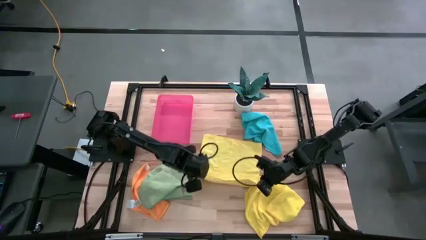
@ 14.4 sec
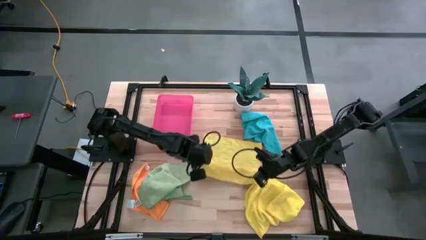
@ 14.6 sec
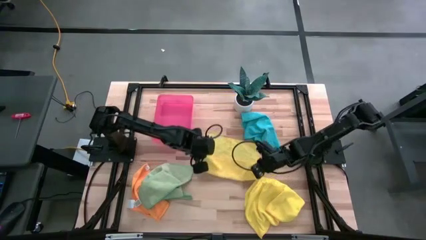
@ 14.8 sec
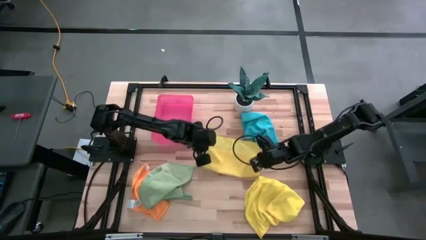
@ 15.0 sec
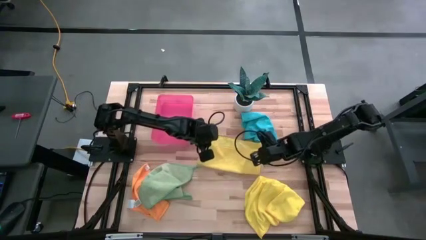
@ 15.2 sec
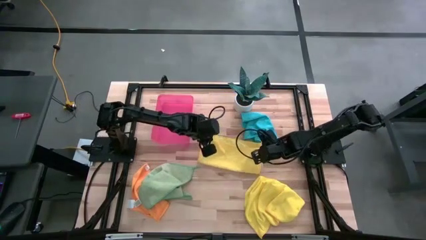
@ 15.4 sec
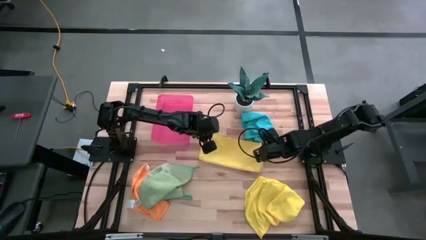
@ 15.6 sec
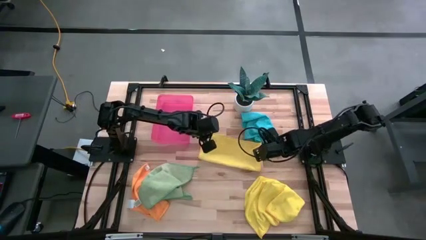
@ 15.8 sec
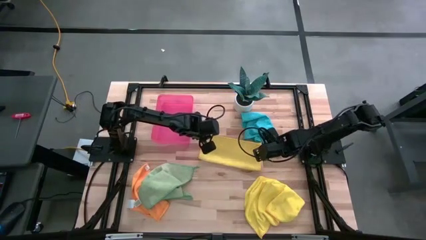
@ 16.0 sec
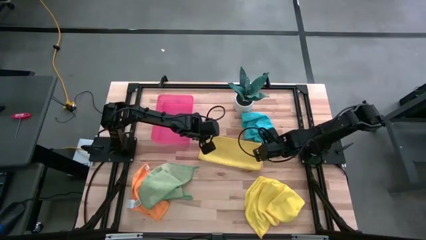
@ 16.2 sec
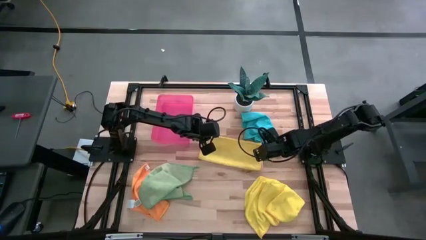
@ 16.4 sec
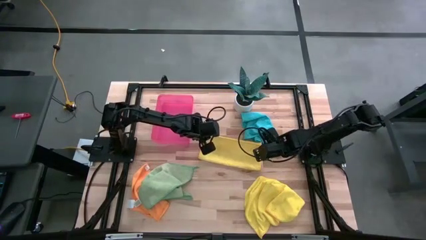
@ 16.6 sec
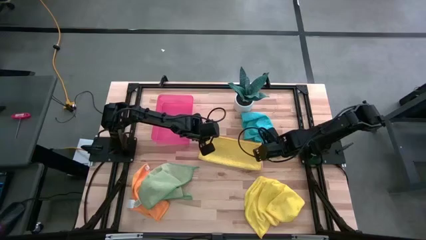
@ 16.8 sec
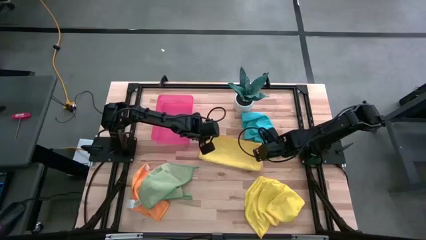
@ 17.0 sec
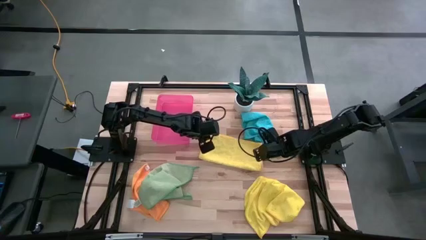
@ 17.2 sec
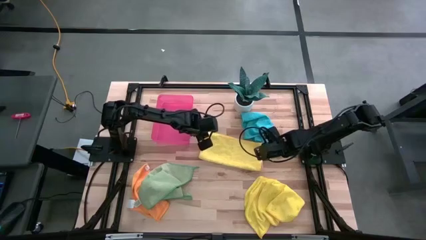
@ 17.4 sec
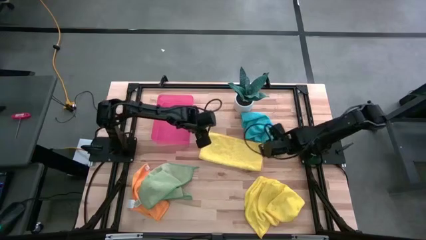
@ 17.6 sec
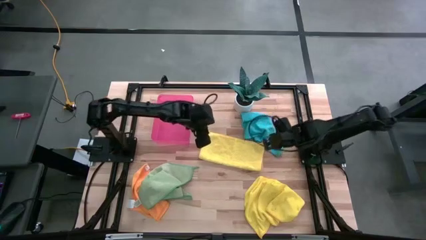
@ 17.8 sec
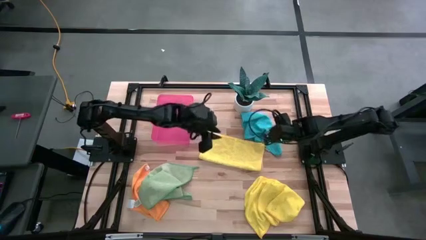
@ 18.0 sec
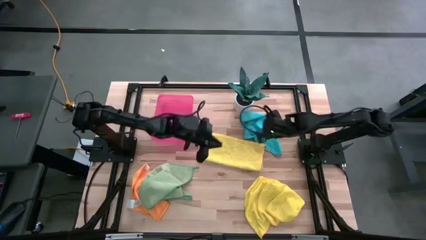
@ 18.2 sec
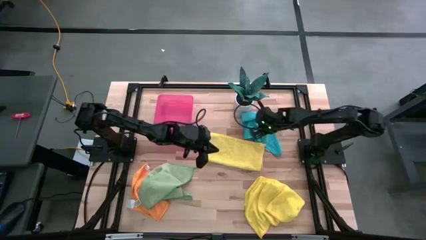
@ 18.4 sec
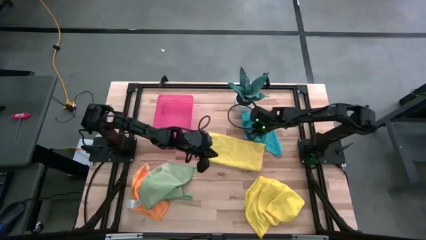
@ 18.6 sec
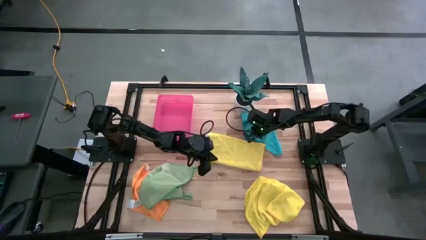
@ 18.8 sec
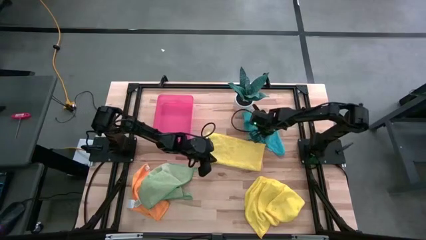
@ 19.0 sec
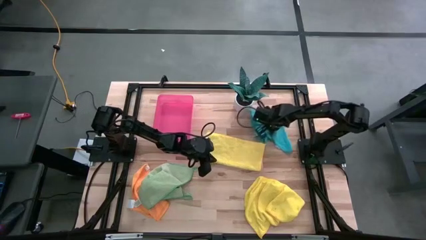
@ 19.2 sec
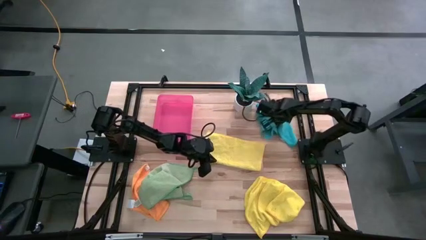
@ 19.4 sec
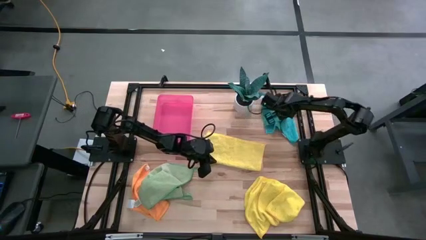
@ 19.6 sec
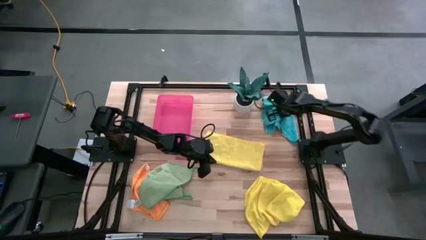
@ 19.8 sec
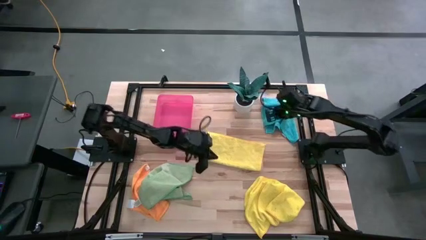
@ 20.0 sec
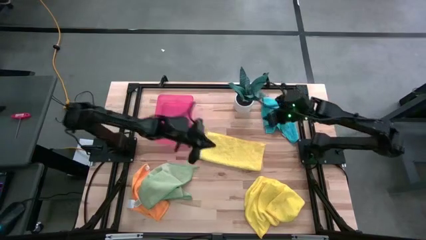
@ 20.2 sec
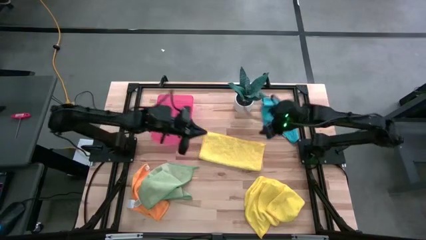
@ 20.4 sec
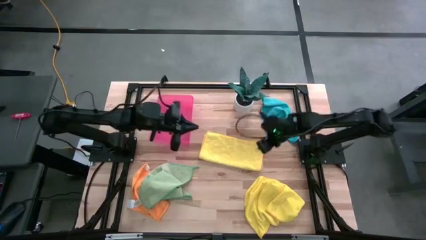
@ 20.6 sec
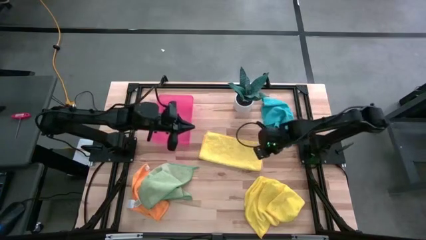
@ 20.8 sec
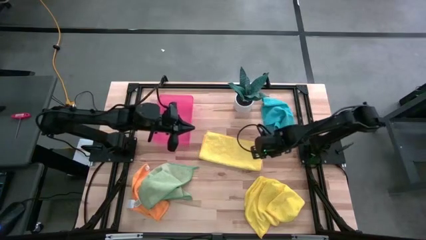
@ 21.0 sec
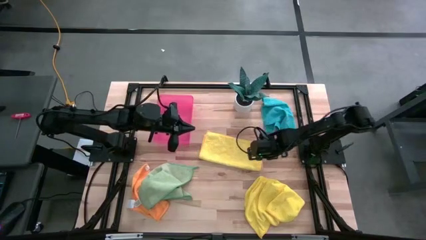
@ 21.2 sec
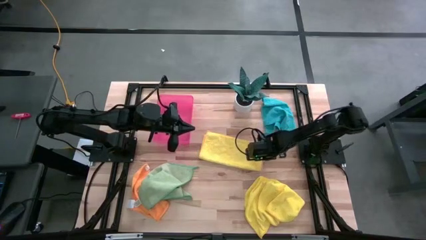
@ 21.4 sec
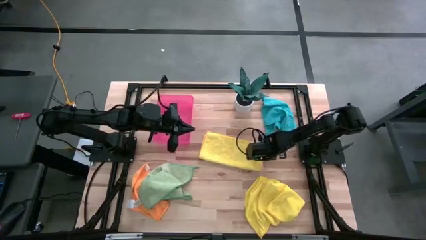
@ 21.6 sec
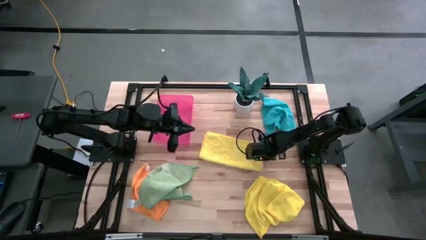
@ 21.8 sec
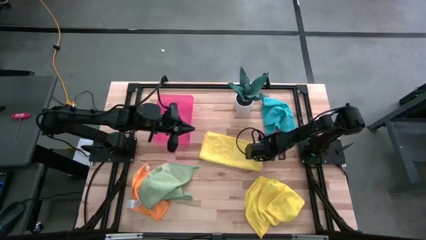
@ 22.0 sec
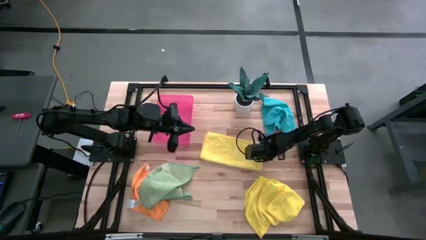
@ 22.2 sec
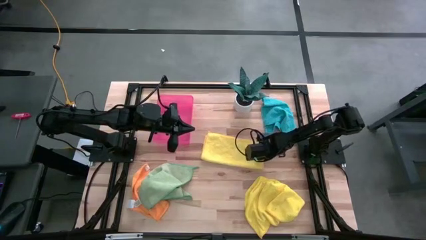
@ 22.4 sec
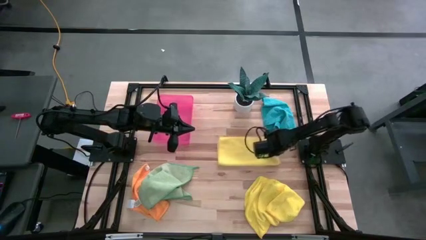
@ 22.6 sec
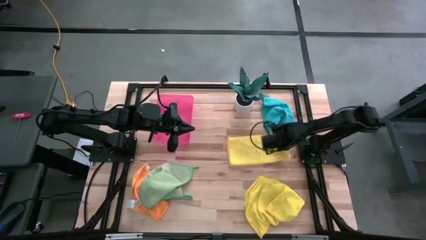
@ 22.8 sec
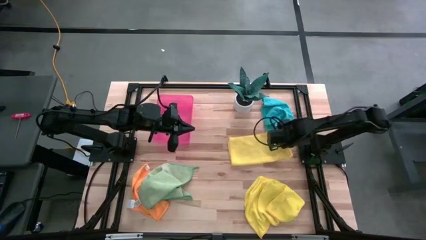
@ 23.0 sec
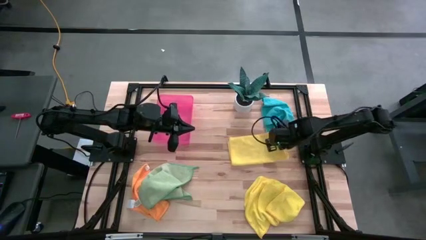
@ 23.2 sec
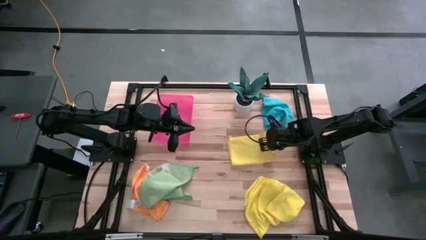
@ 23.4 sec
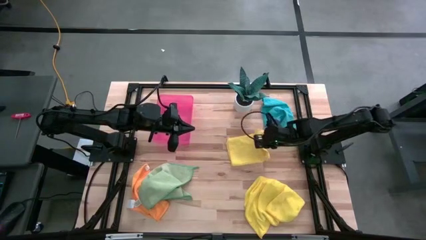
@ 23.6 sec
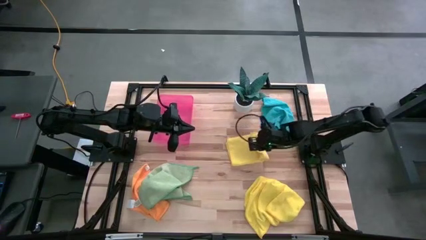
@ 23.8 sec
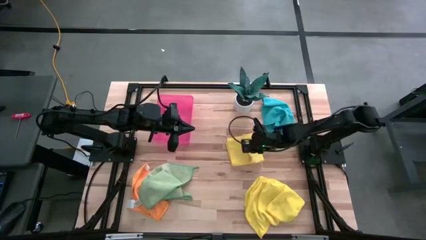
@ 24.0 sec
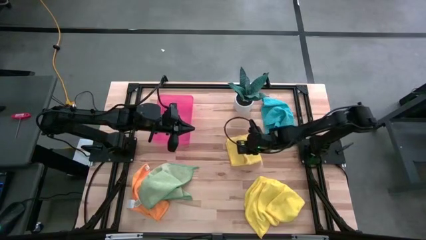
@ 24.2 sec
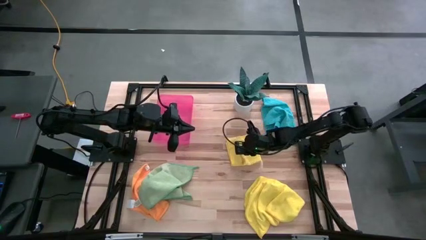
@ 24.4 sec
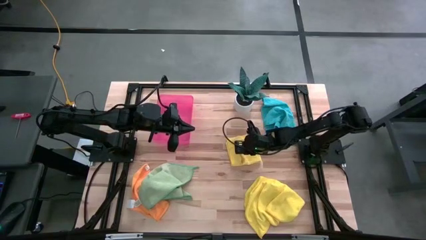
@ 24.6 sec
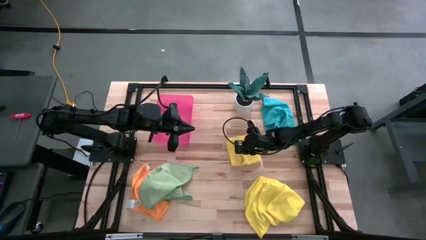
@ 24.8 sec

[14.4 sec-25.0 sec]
Task: Fold microfiber towels
Fold the top yellow microfiber towel

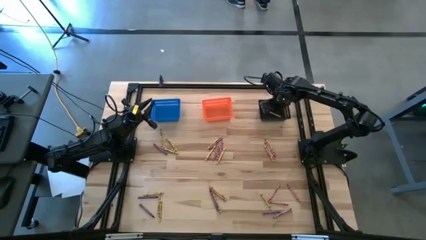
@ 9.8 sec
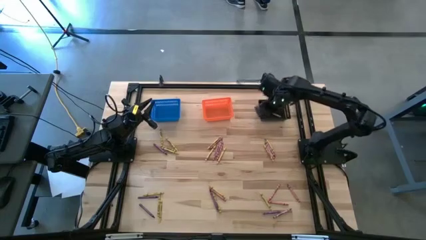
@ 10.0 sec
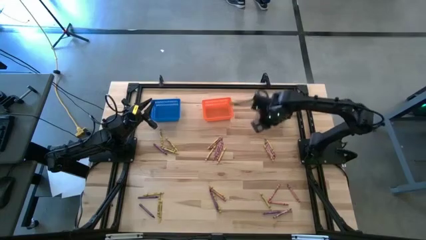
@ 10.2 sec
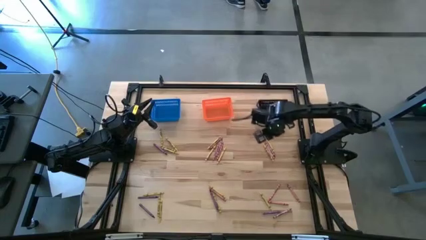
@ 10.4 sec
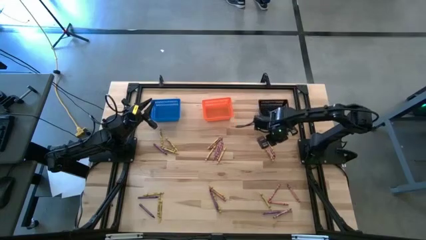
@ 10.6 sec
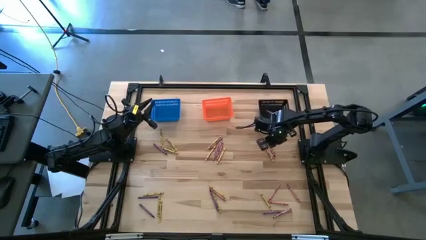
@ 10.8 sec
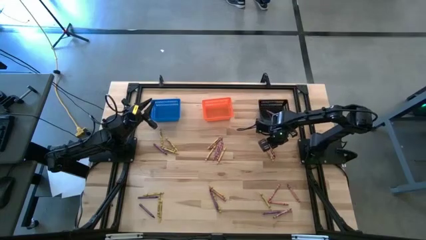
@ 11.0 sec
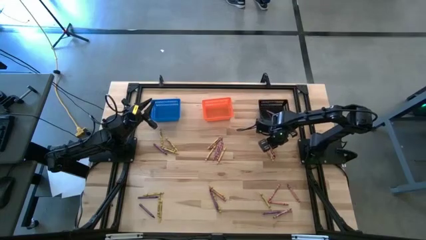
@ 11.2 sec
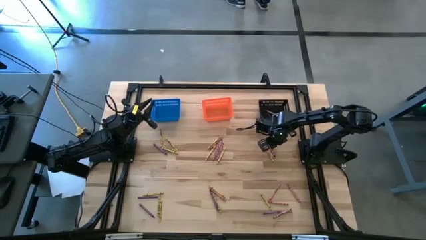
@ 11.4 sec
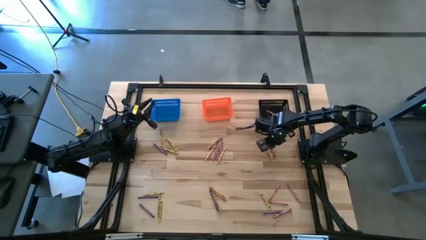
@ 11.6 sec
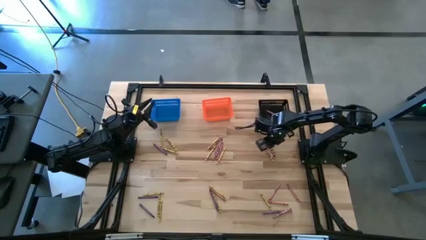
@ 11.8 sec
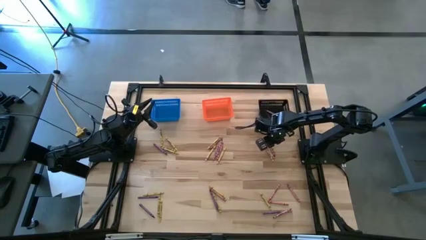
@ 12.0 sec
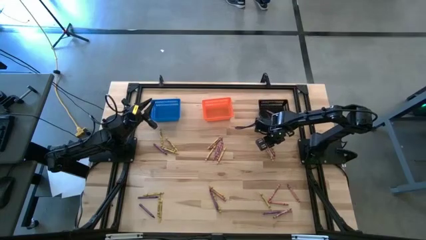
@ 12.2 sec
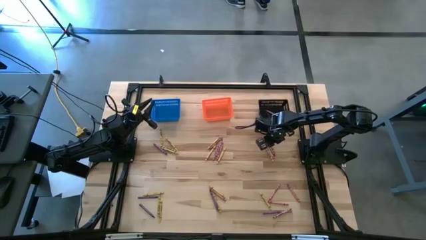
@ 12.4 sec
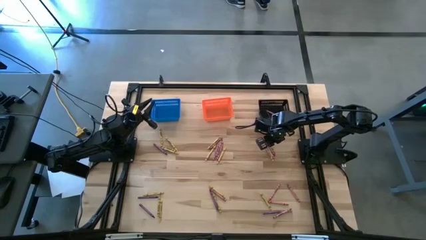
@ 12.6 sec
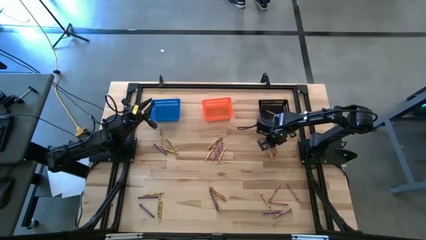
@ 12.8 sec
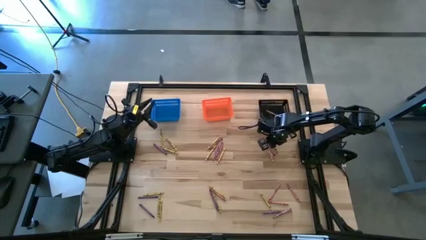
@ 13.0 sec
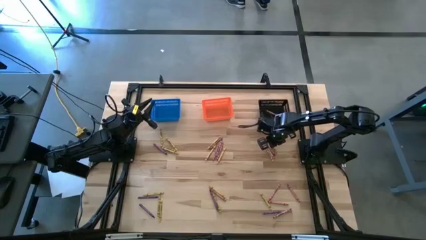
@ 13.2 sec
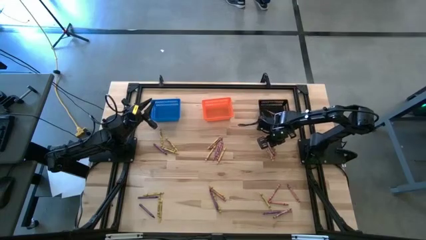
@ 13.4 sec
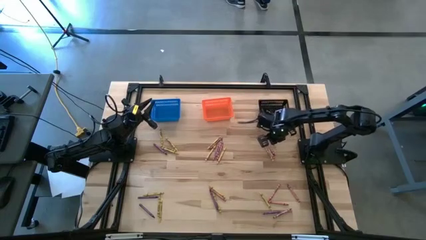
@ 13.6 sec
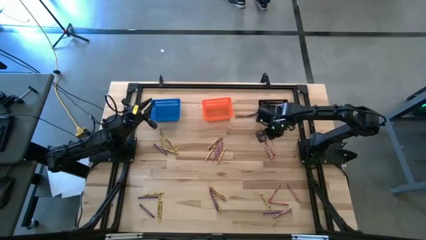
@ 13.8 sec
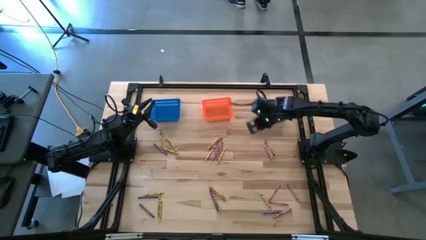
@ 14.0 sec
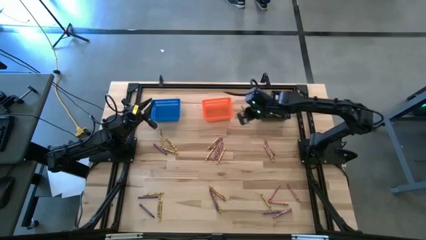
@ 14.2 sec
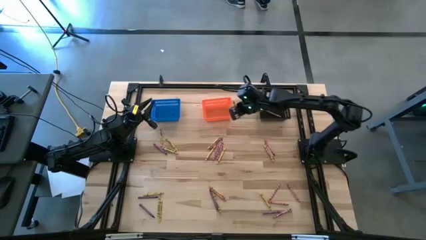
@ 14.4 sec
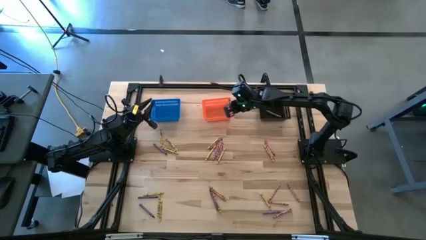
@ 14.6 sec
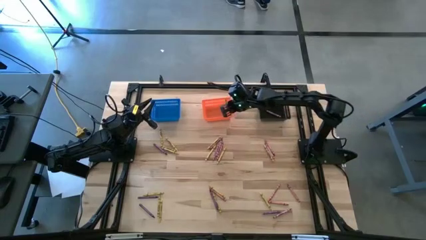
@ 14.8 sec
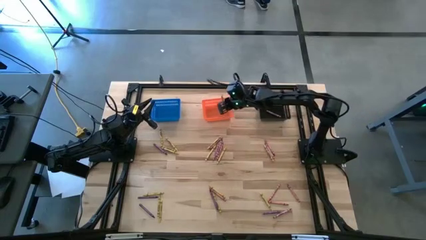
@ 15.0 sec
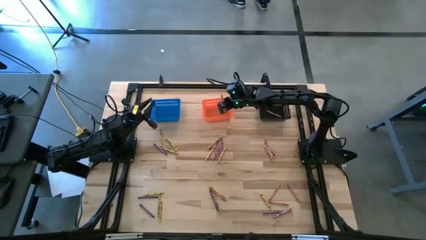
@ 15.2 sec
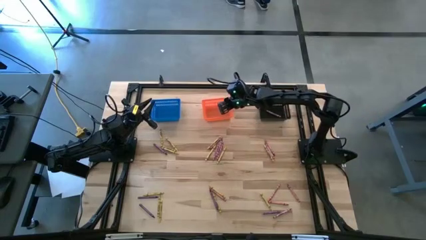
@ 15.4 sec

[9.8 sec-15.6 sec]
Task: Sort crayons
Put the yellow crayon into the orange bin
